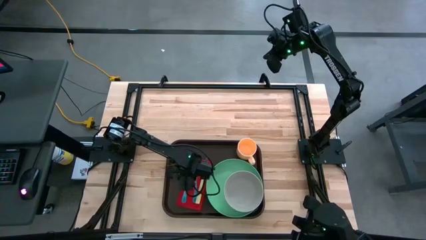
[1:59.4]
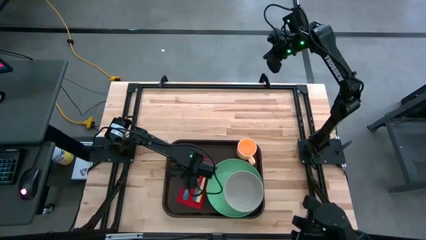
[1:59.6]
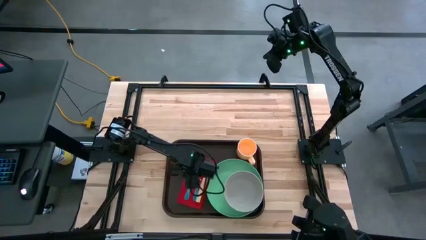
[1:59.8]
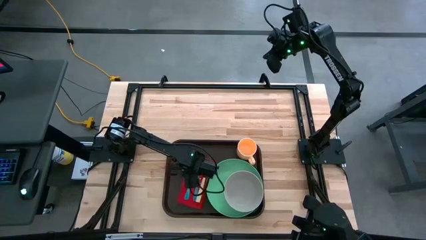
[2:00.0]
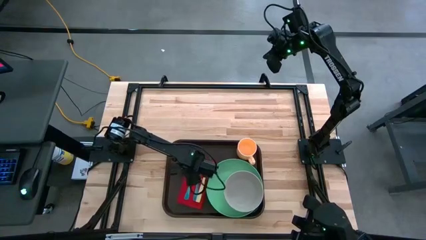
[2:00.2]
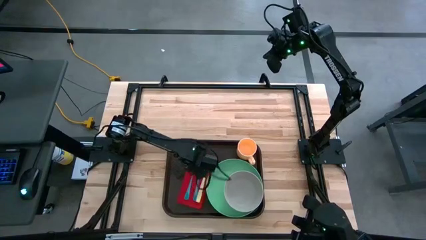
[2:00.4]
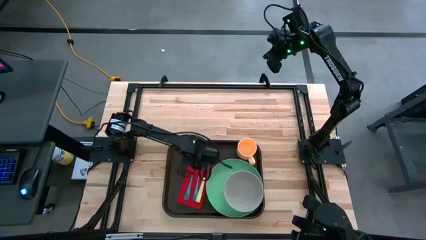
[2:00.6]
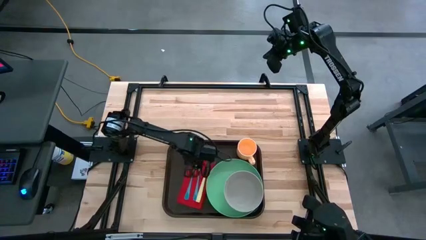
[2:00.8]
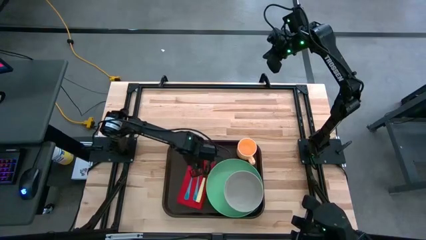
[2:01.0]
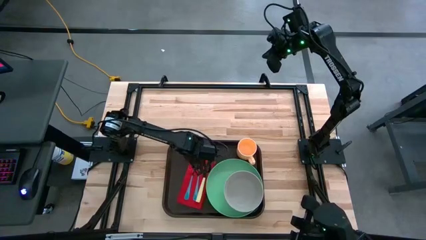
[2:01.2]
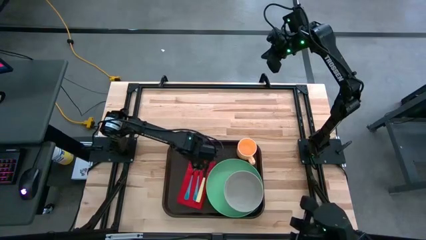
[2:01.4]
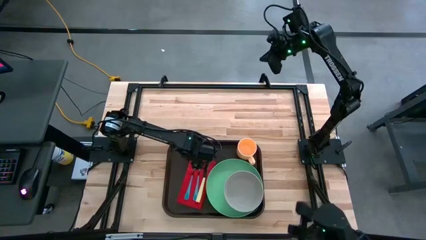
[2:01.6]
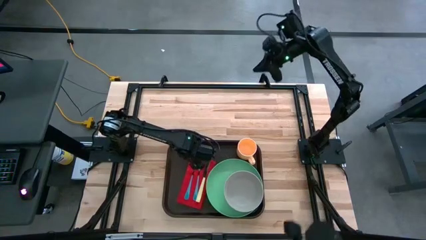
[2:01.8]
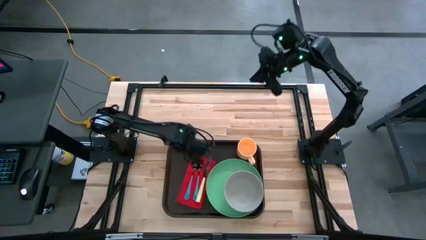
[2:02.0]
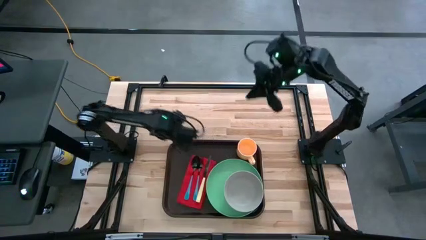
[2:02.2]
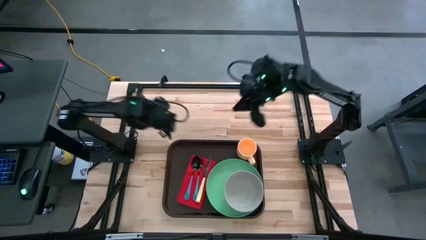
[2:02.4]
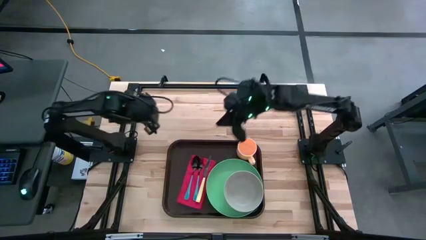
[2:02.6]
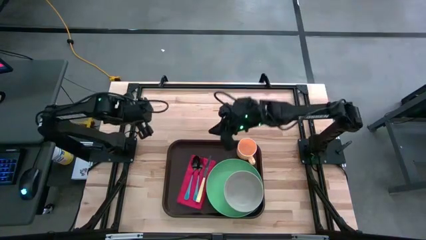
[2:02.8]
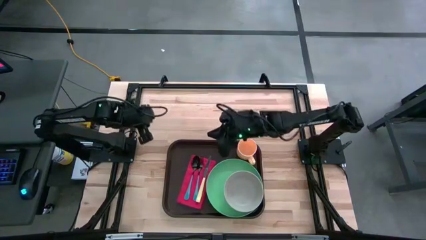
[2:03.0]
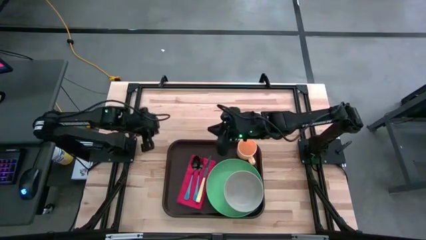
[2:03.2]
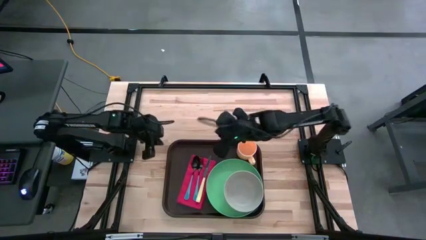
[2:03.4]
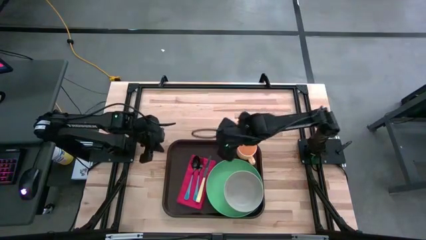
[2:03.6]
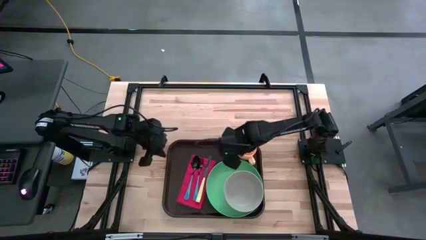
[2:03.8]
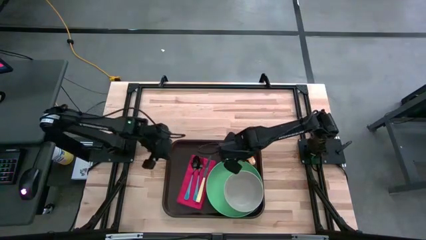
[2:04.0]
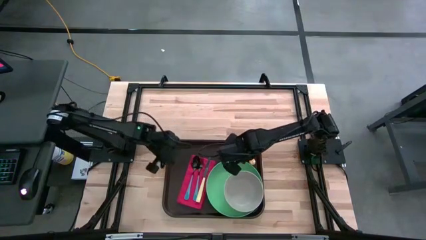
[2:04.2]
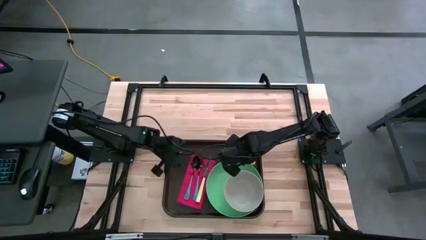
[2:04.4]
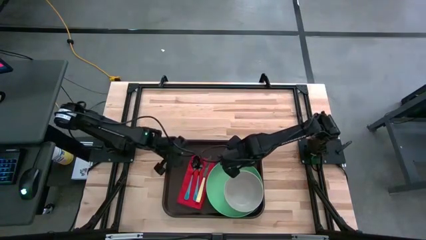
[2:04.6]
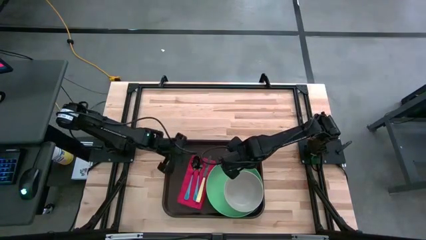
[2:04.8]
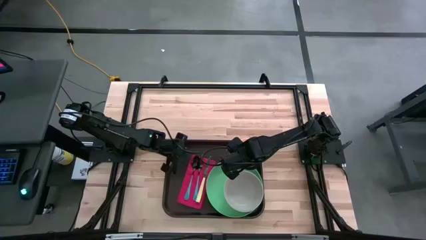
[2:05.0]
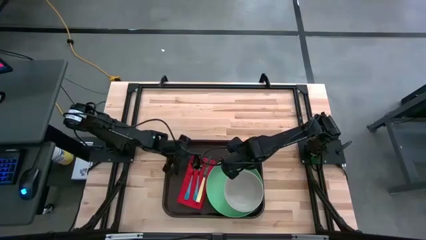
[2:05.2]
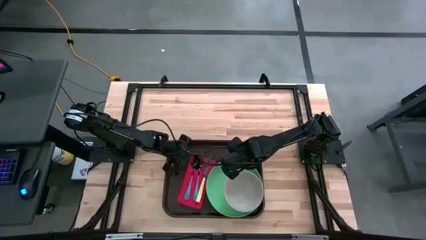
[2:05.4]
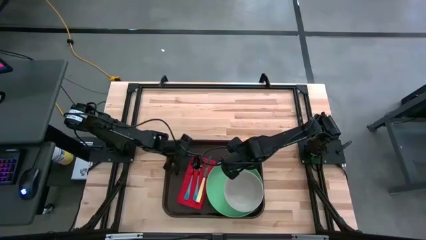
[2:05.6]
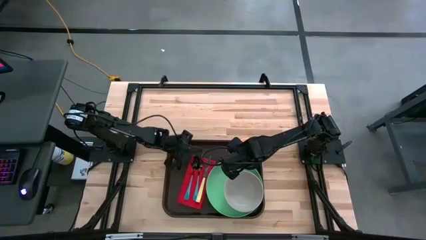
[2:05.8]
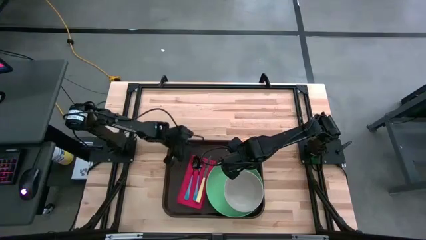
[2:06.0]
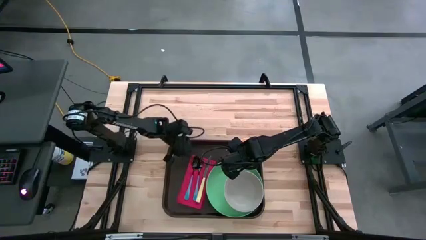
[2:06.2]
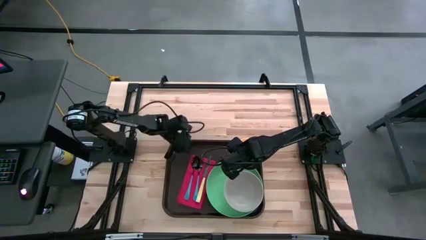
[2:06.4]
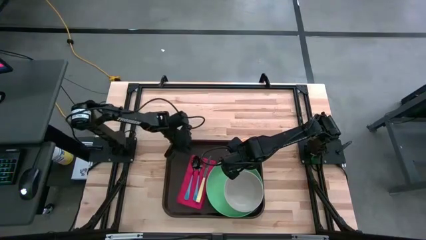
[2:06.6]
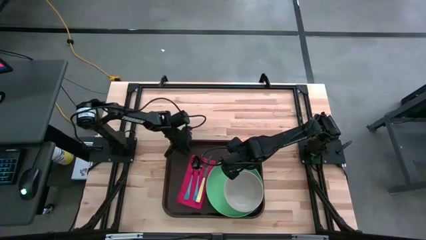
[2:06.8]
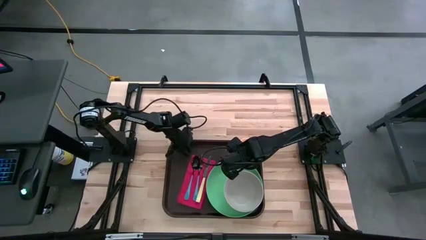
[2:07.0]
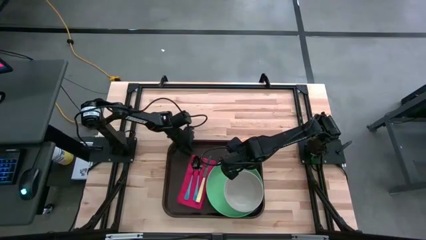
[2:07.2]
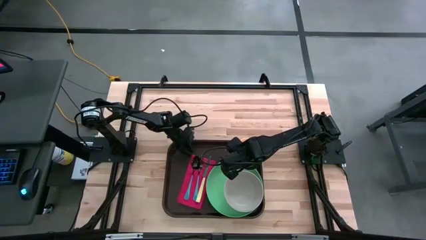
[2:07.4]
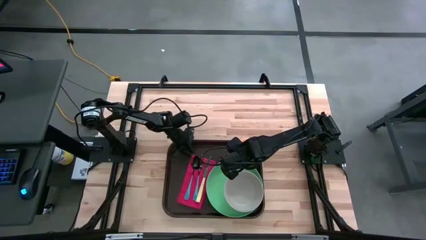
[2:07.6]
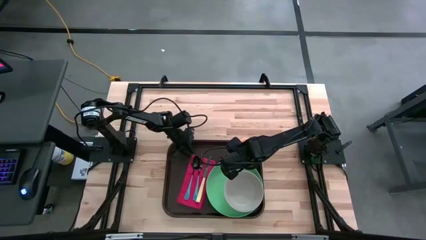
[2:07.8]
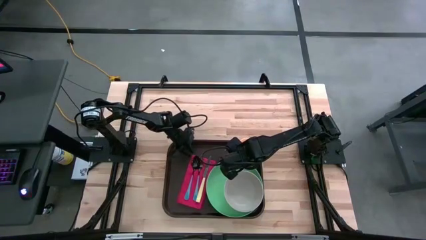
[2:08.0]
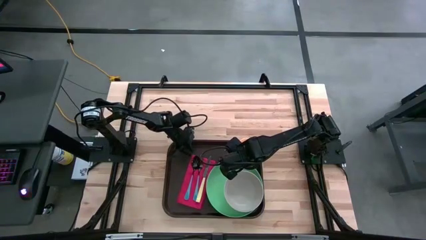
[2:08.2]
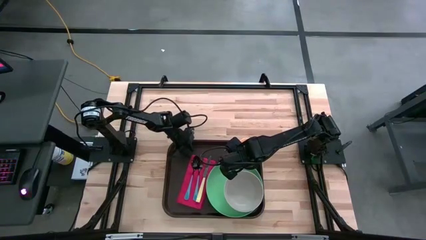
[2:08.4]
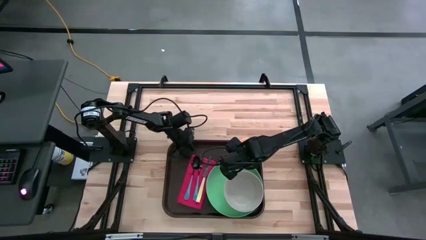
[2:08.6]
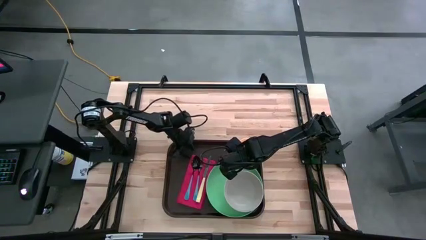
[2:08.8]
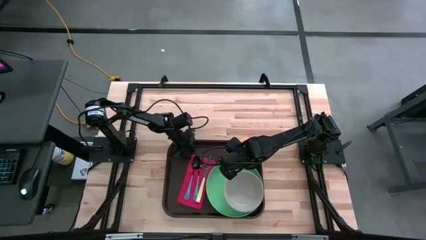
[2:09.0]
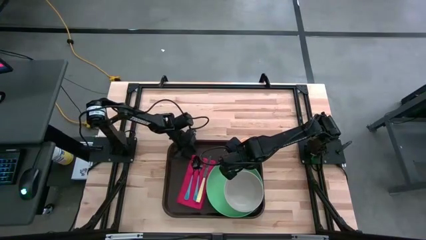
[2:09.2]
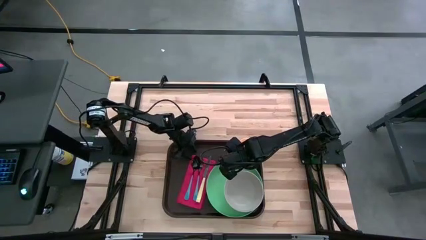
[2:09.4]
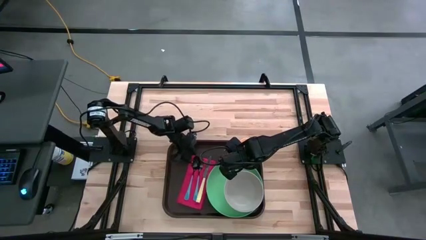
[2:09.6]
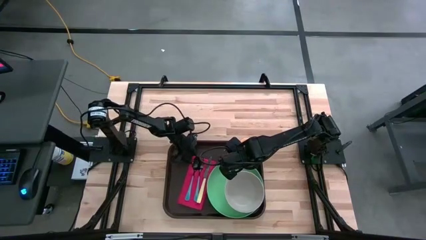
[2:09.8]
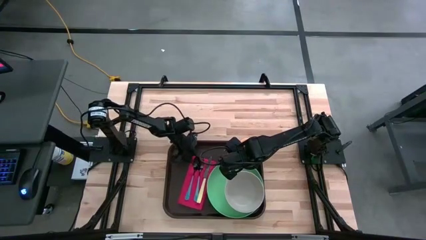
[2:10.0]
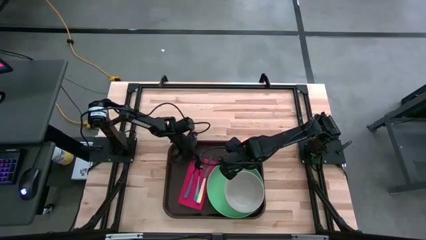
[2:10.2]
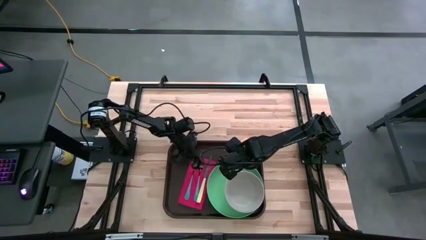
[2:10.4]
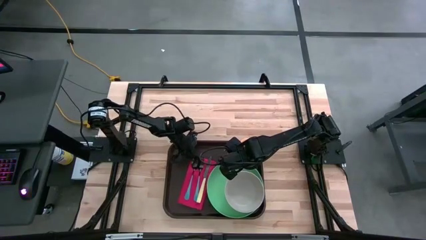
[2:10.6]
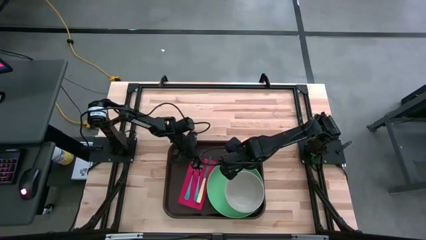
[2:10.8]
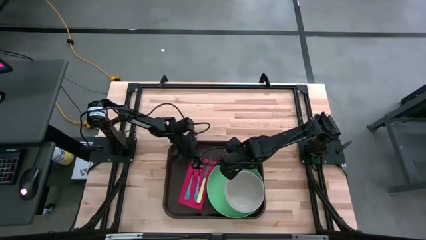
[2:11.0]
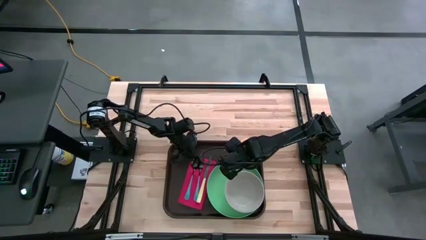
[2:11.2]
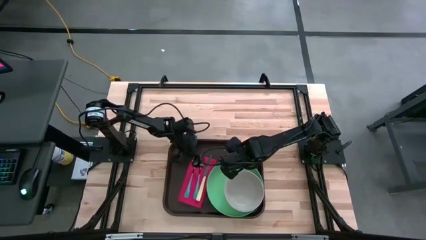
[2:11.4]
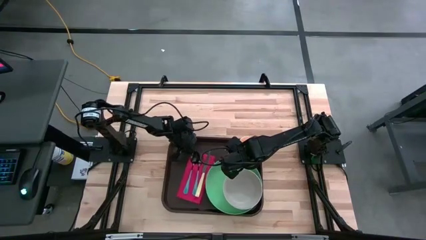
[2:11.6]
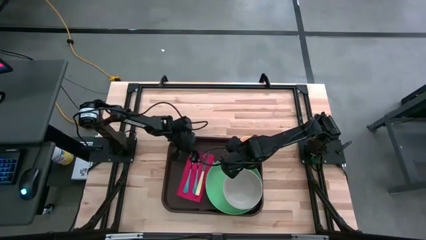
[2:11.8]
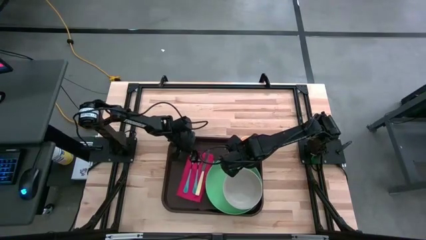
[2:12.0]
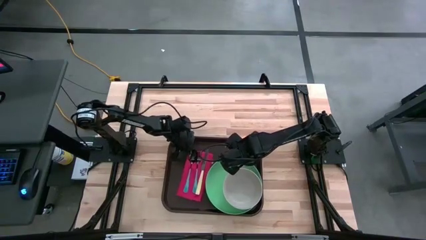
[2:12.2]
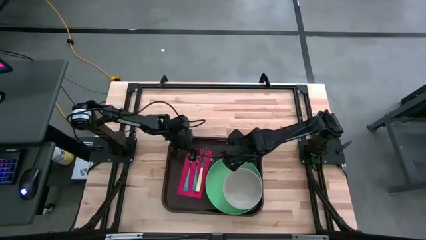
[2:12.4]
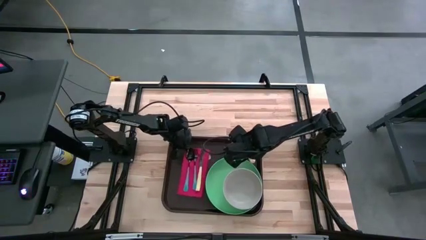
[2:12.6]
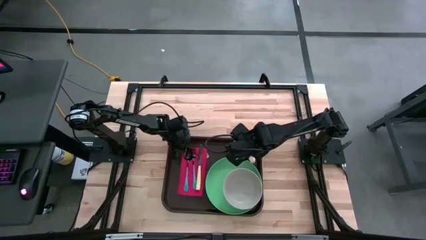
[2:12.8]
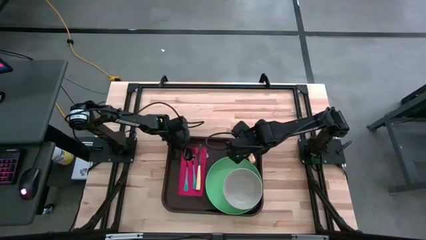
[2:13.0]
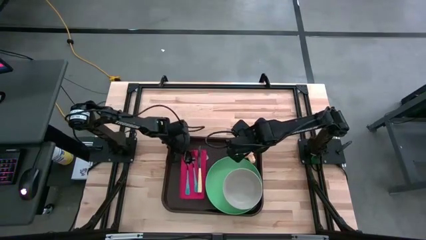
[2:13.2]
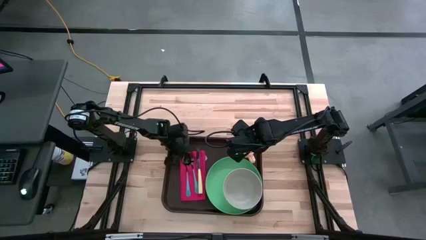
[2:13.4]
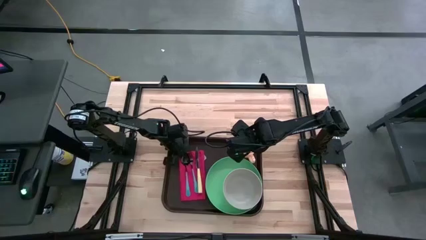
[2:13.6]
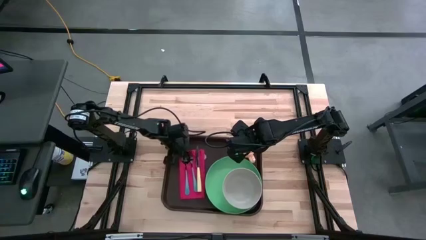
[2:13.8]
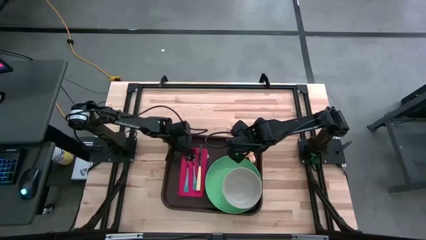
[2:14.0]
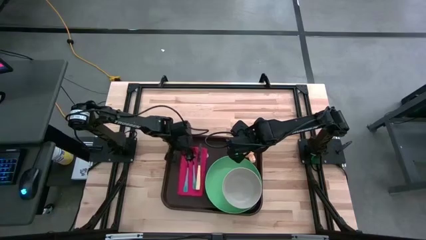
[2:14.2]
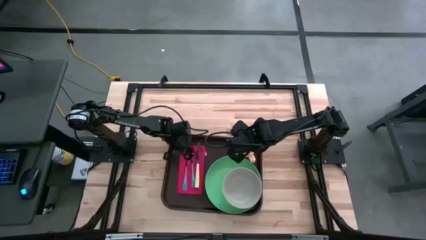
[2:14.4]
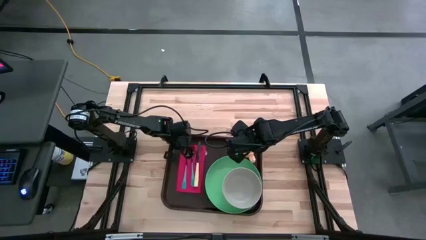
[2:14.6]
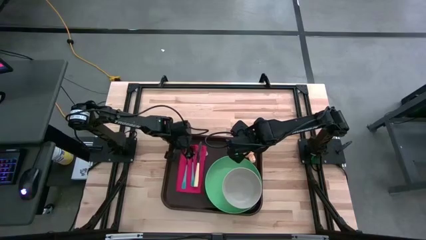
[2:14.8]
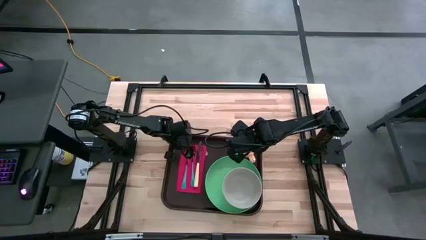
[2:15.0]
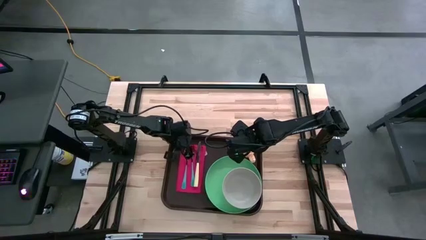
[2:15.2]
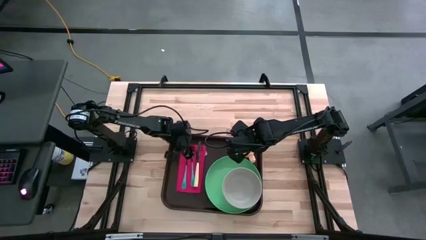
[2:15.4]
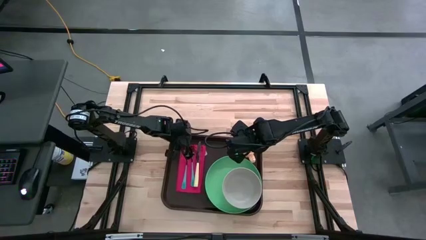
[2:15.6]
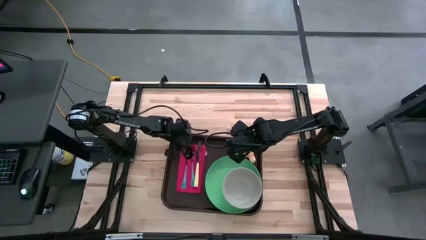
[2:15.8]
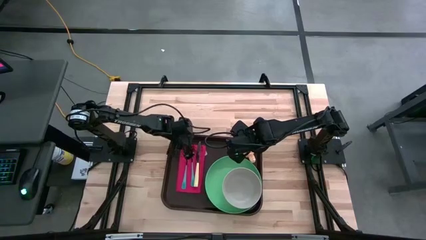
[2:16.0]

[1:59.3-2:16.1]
Task: Set up tray
Adjust the red napkin on the brown serving tray

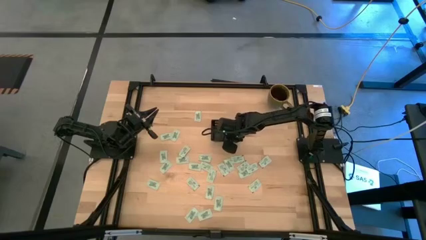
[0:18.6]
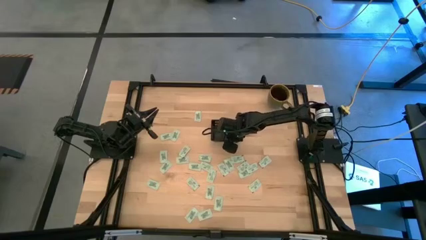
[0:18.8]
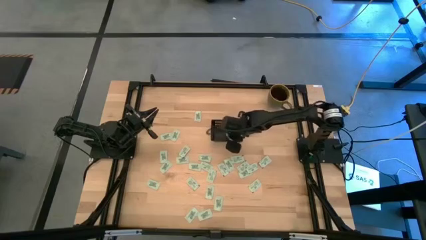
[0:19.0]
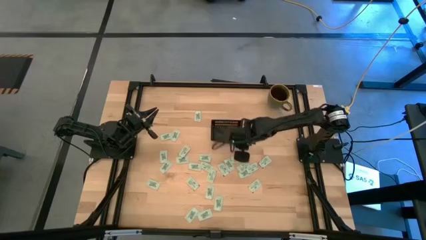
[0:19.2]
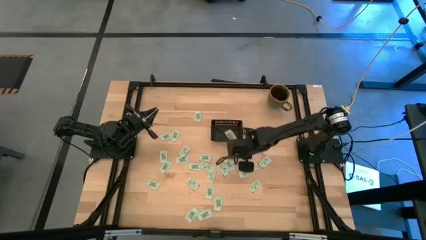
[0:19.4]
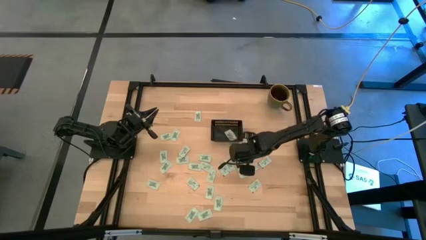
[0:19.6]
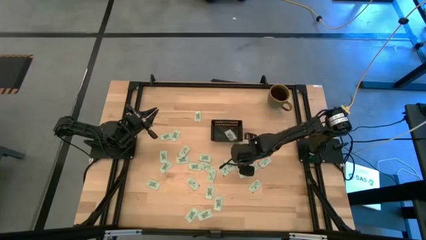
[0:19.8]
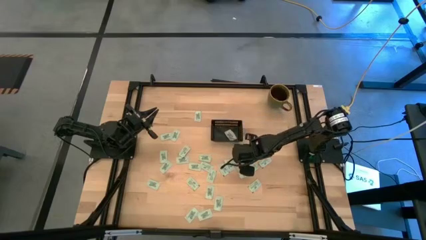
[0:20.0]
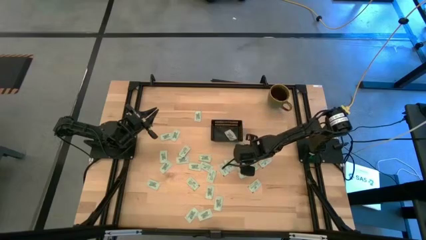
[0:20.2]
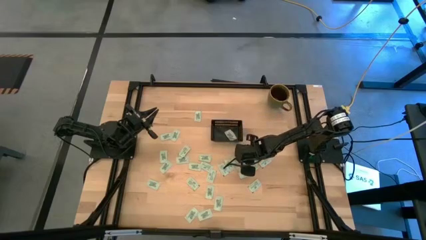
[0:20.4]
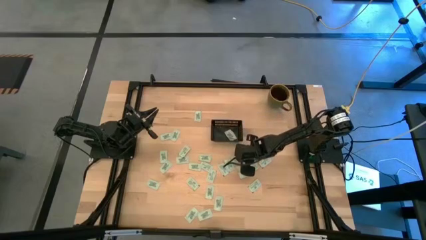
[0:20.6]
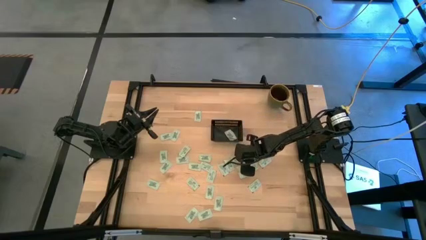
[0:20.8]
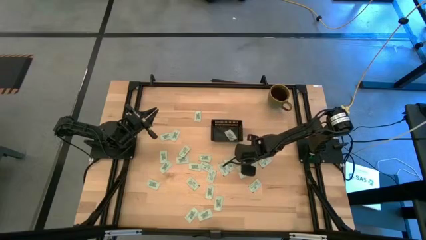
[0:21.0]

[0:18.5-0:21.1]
Task: Pick and place Stevia / Truvia into bins
Put the stevia packet into the black basket
